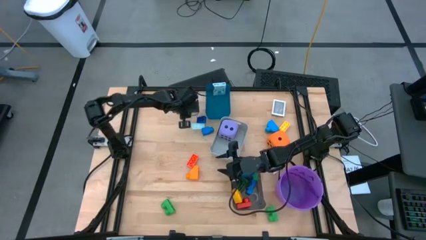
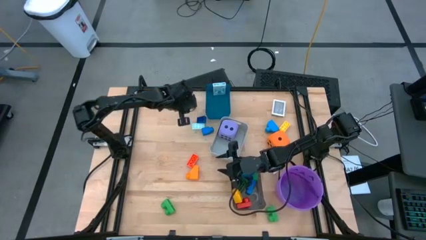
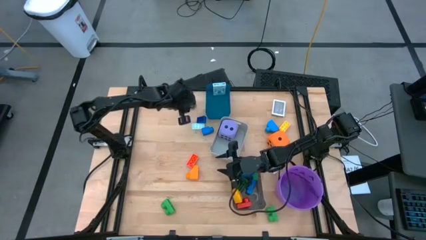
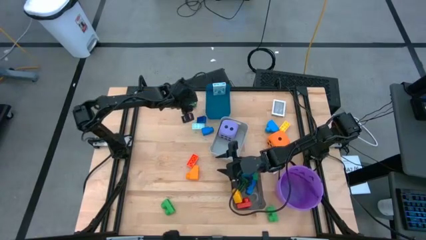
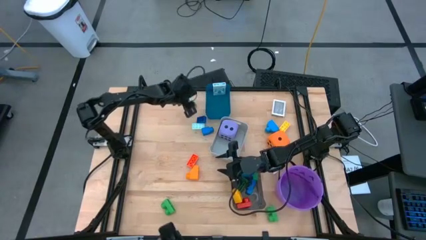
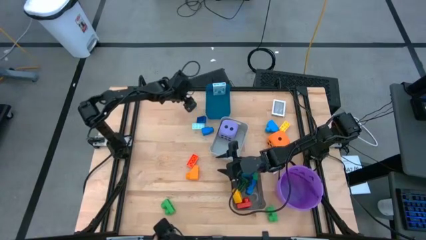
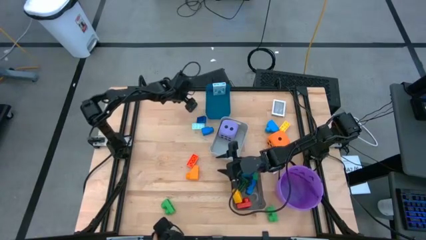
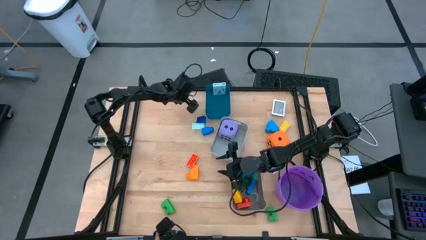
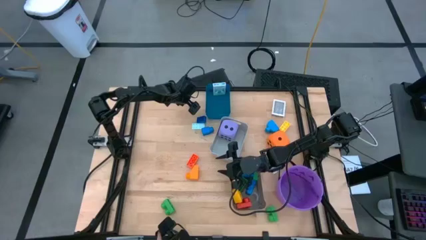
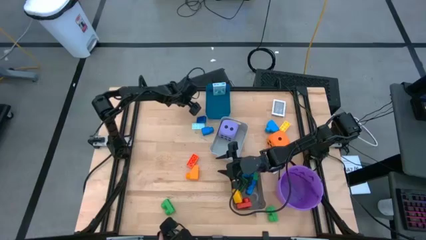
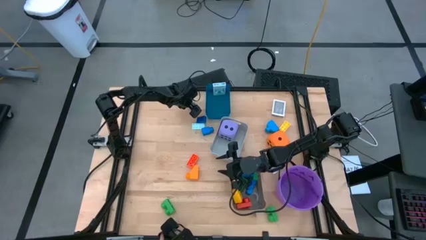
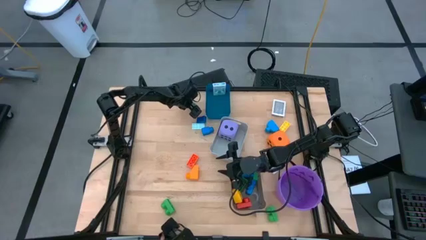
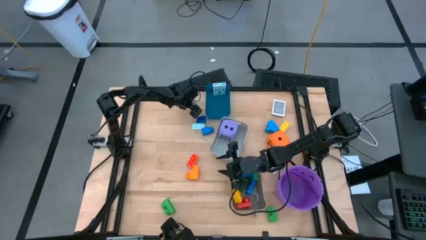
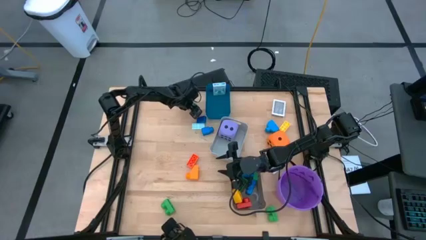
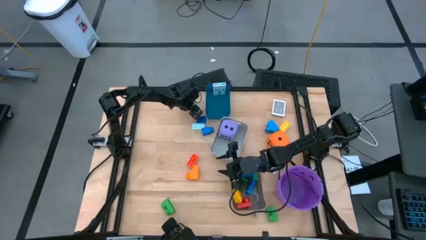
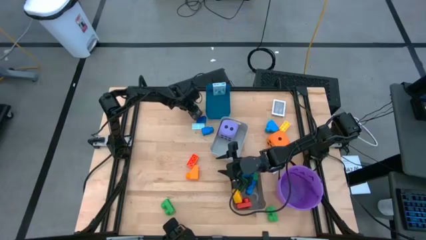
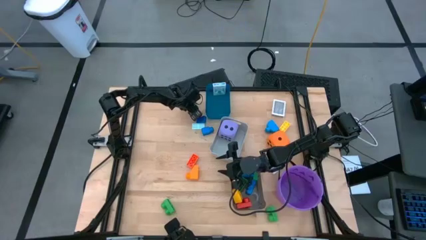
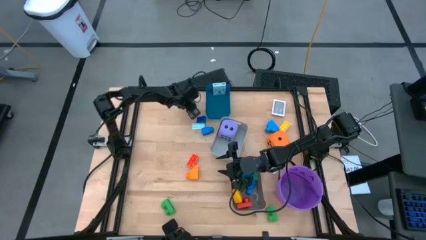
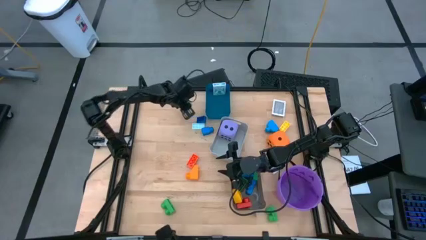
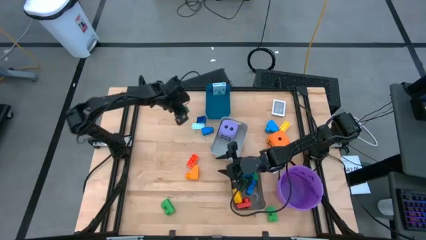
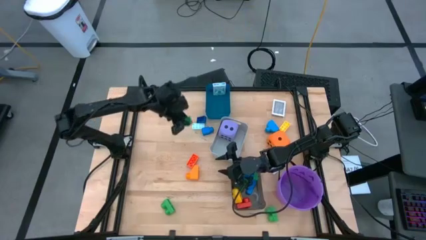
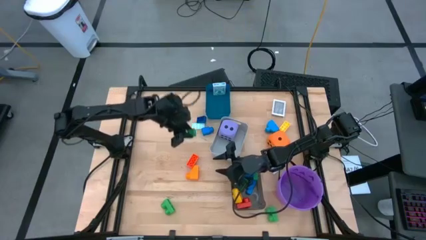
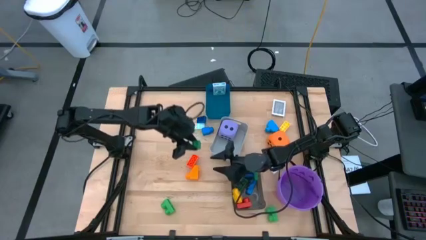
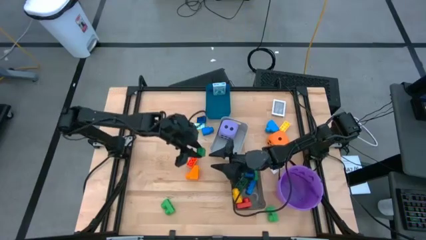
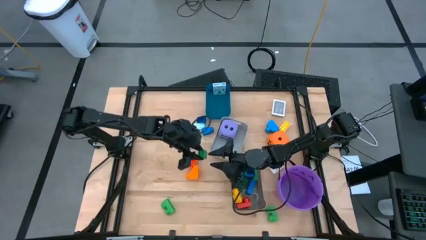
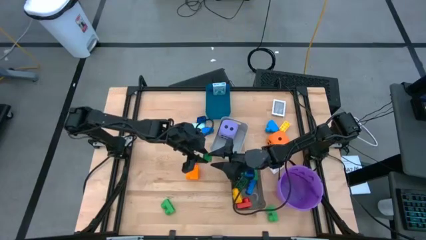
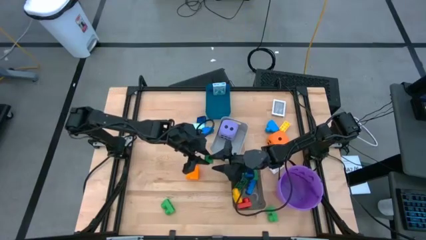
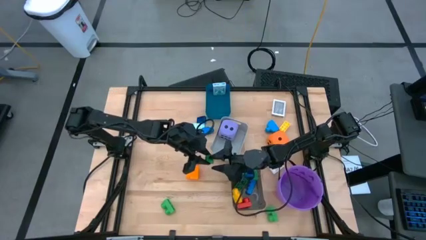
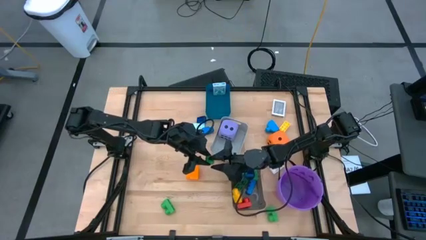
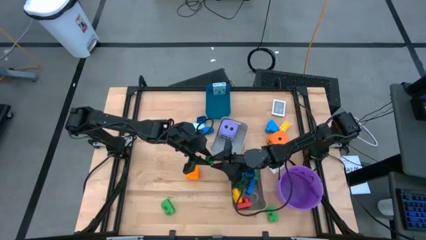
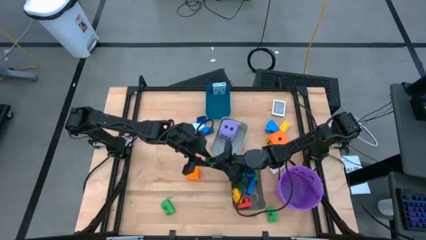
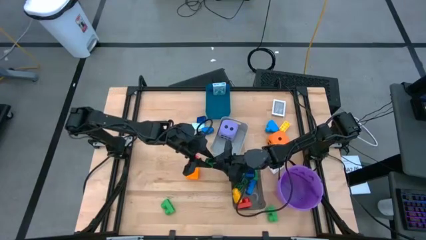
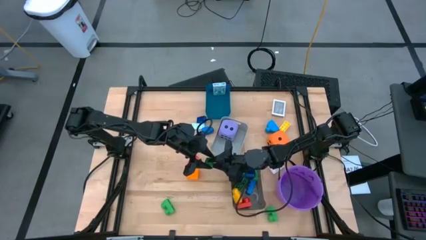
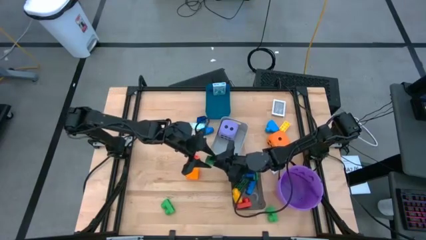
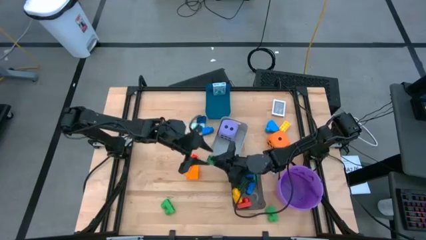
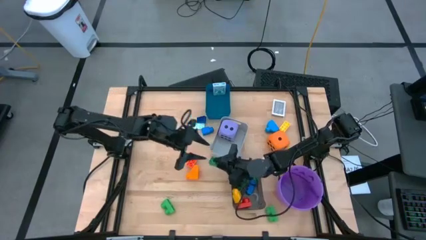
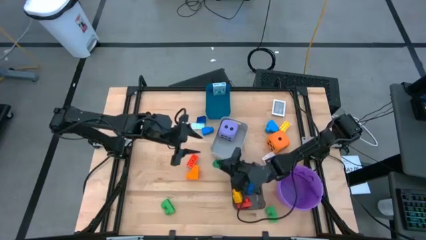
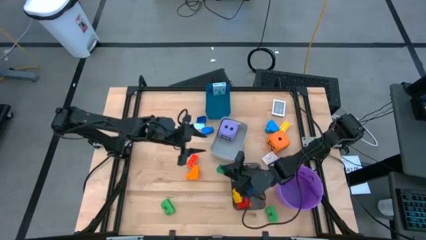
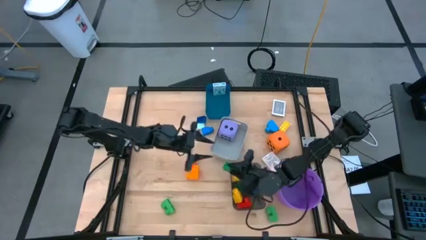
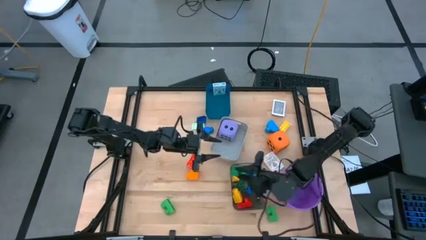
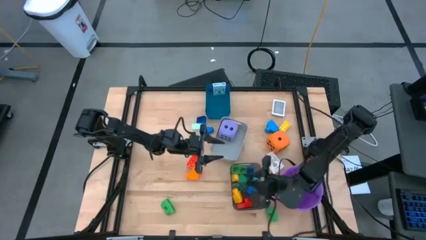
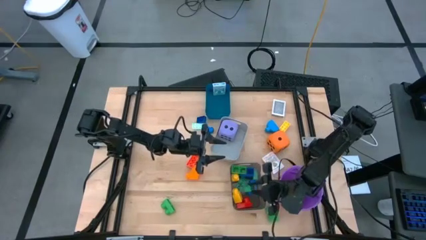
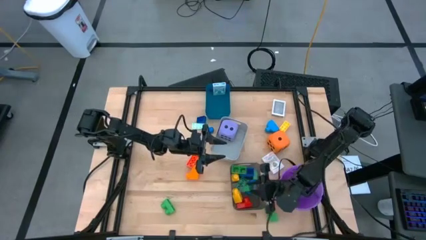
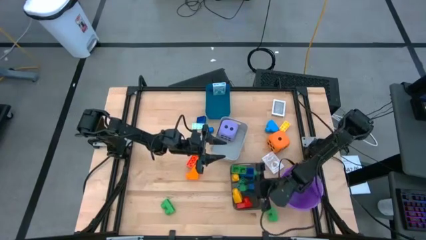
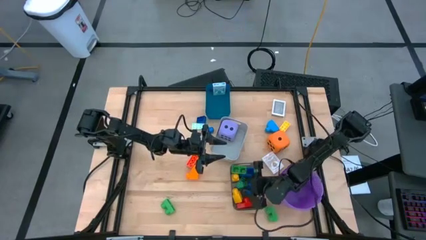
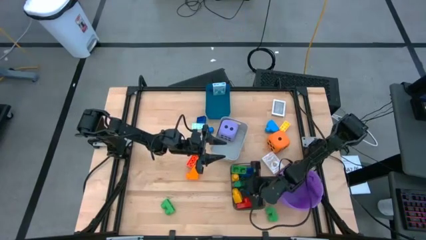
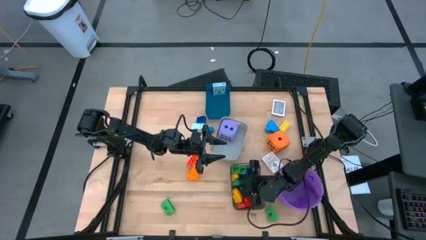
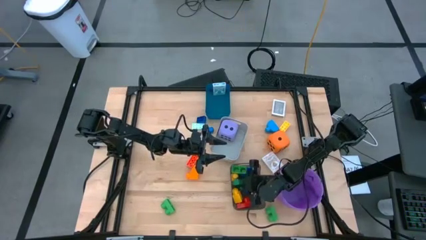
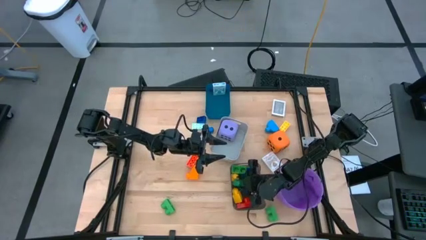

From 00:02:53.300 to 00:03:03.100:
Task: Pick & Place Toys
Put the dark green game piece into the black bin

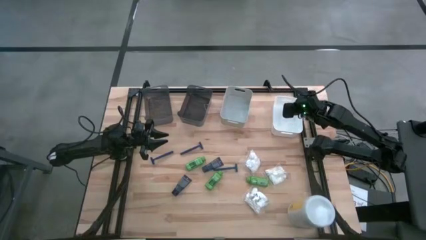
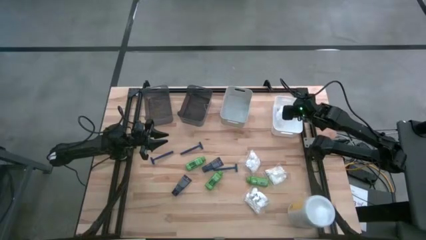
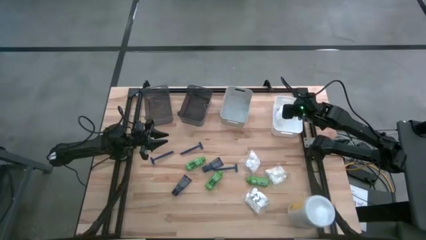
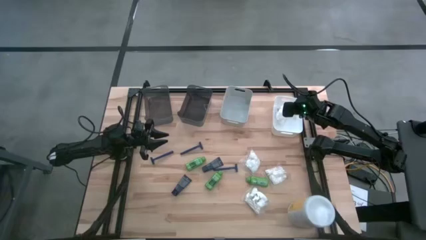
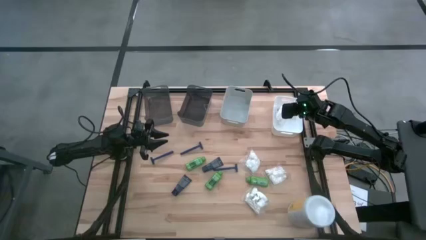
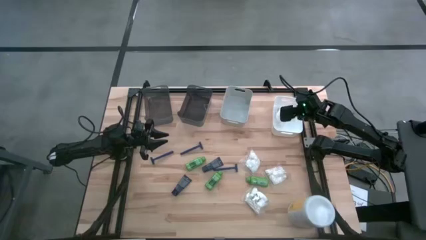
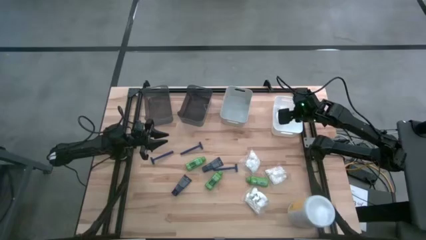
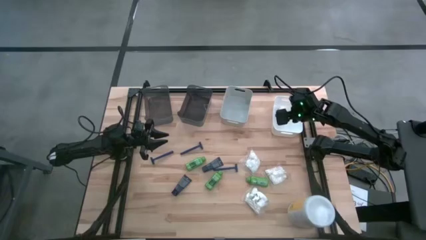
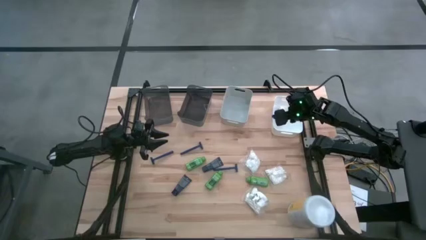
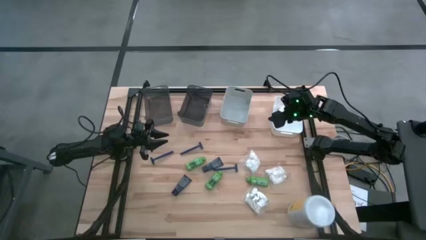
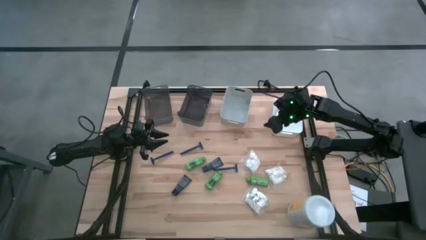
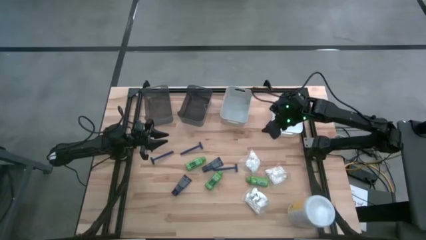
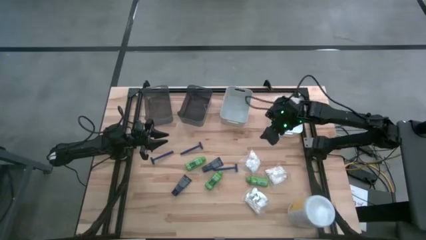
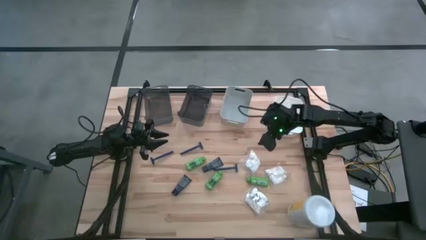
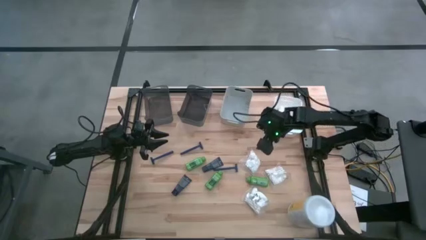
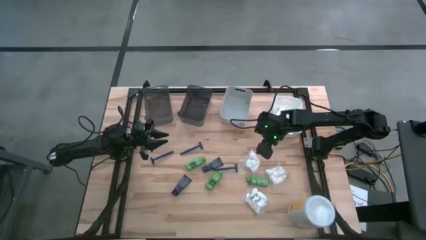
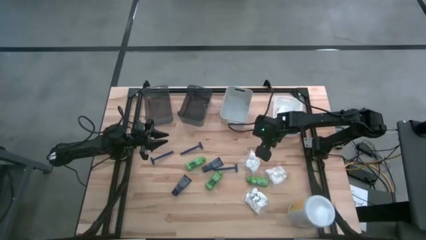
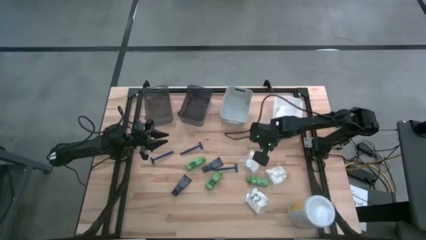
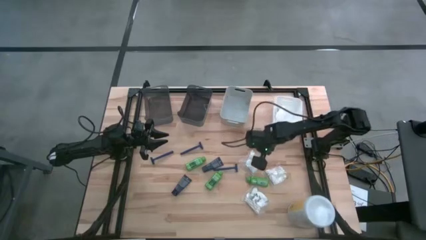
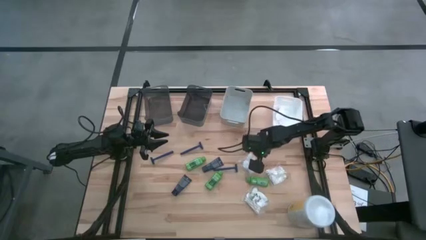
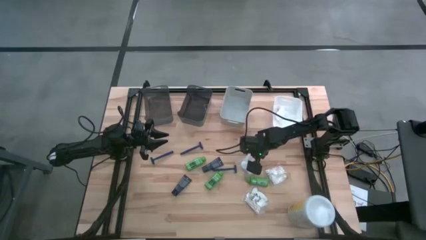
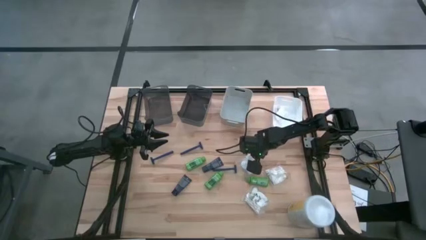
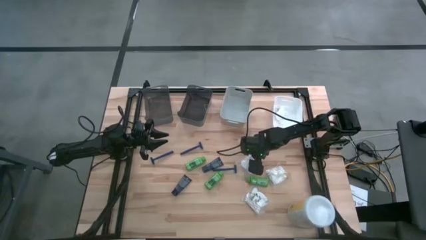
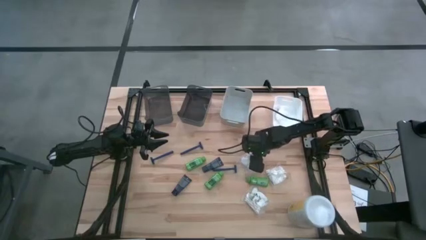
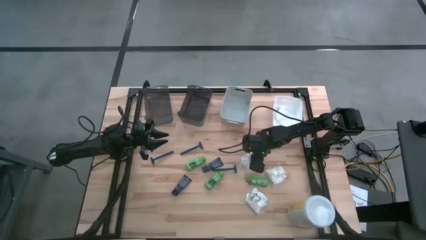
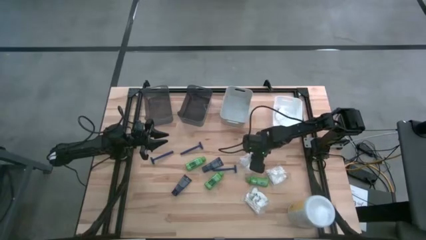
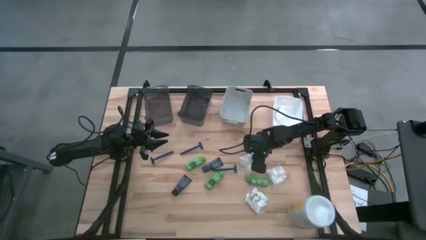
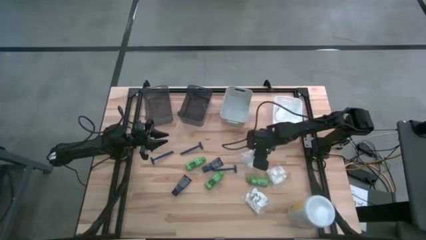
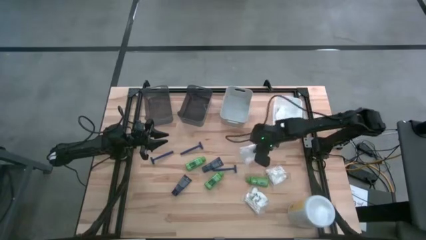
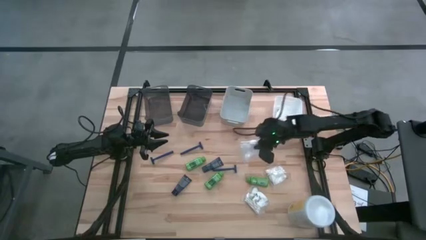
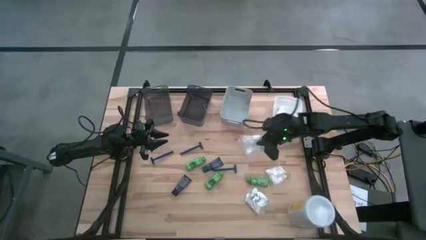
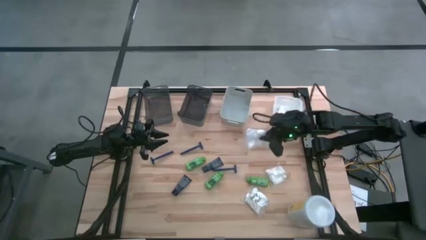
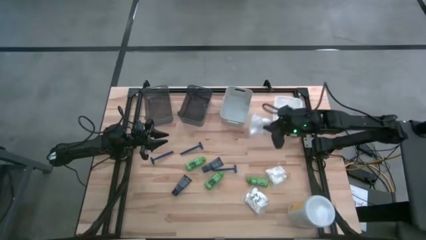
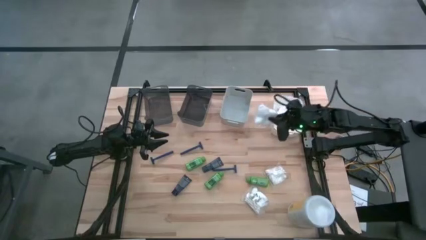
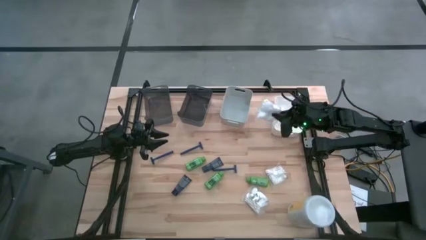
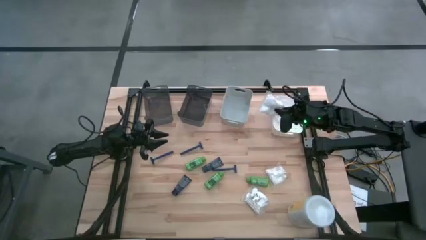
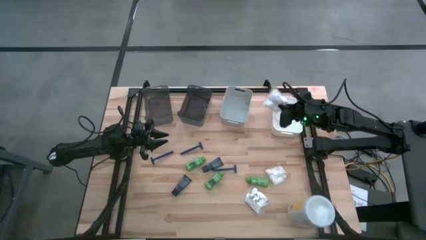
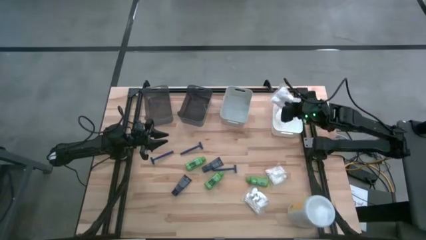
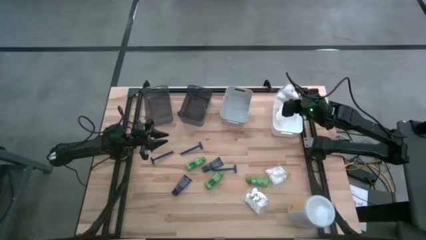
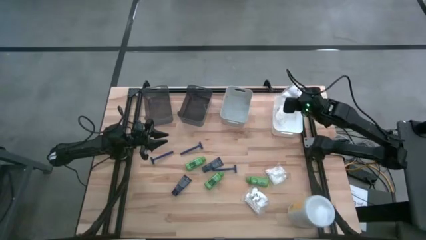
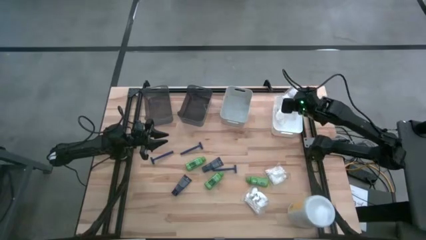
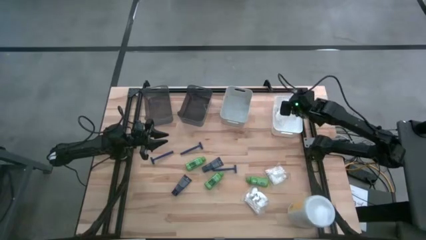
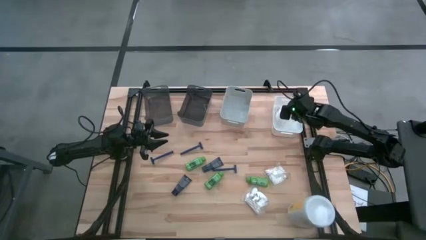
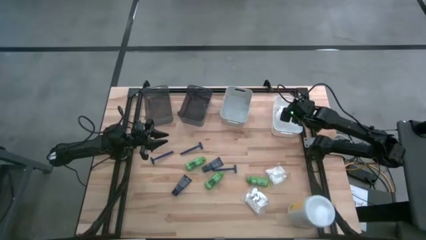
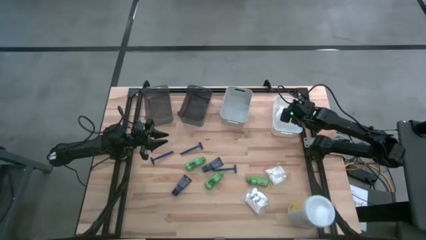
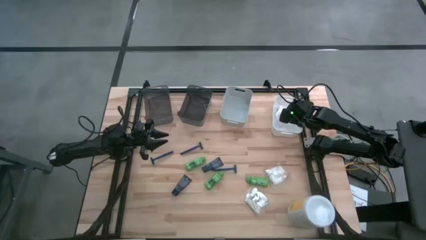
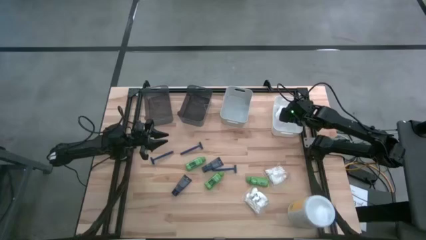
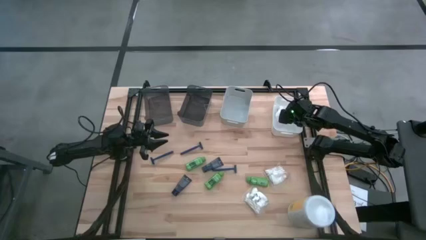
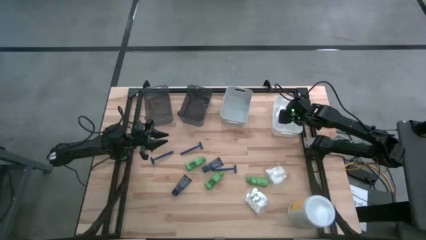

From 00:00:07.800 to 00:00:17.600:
Task: Pick & Place Travel size toiletries
Put the white cotton pack into the white bin
